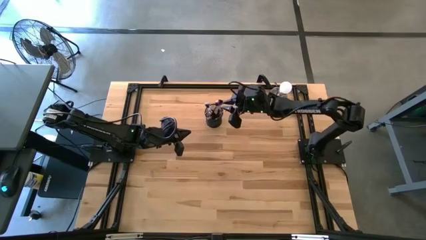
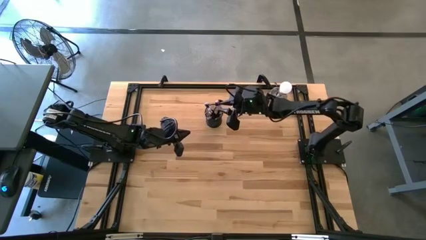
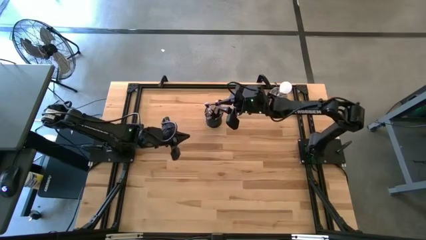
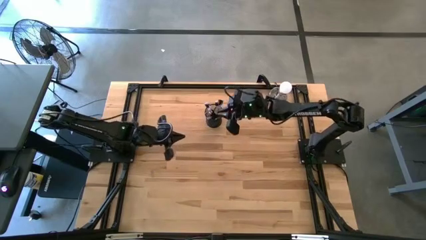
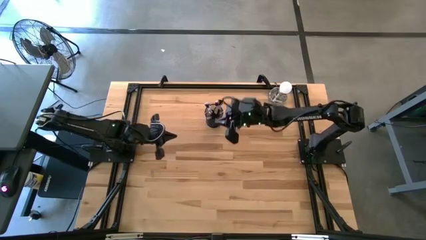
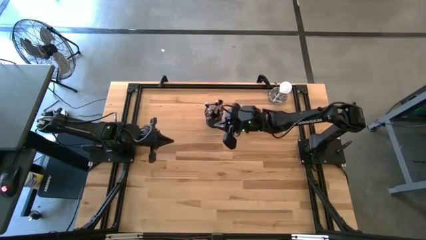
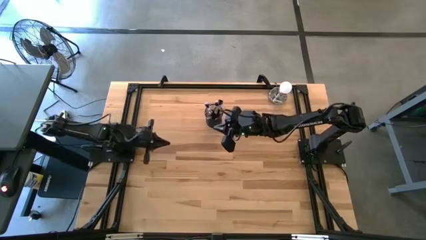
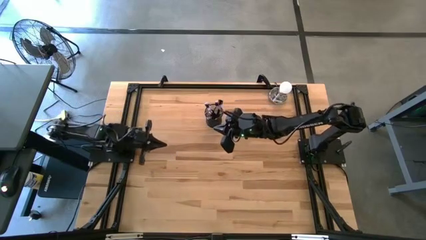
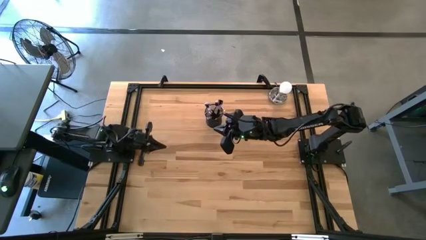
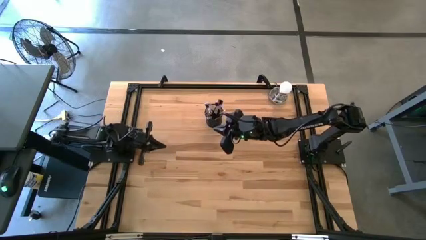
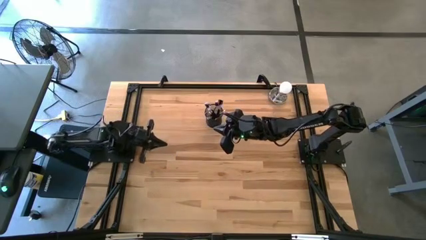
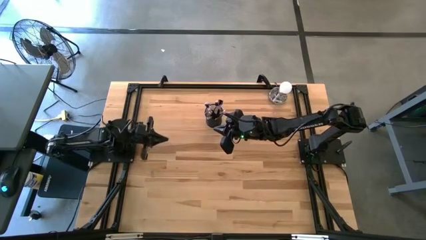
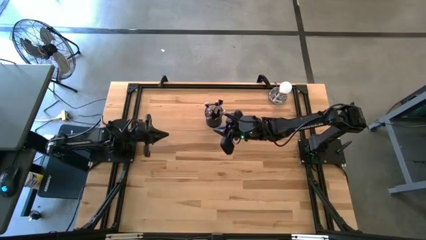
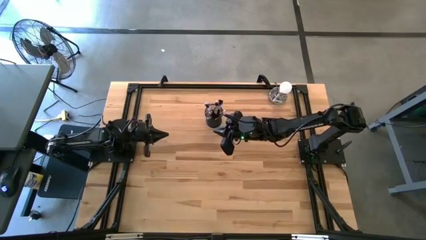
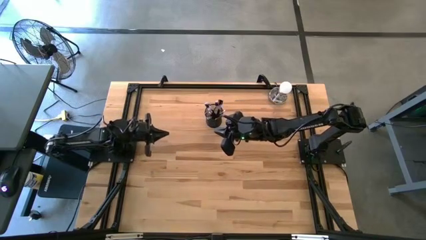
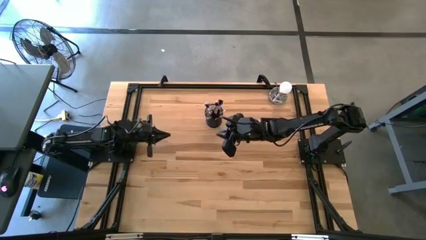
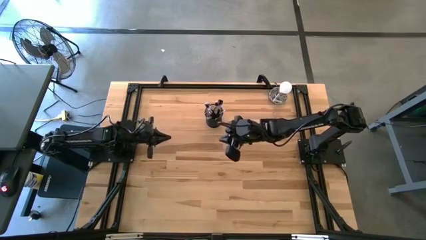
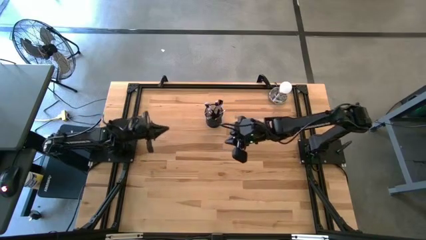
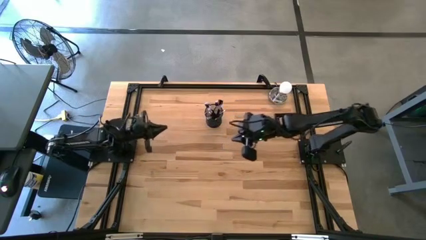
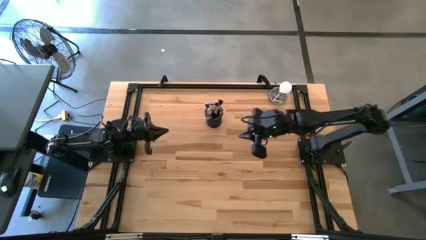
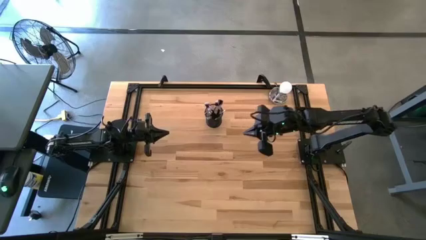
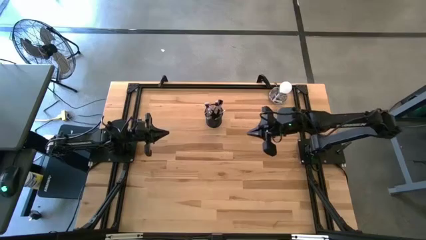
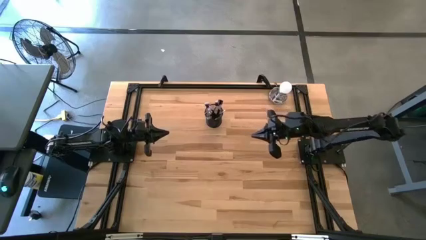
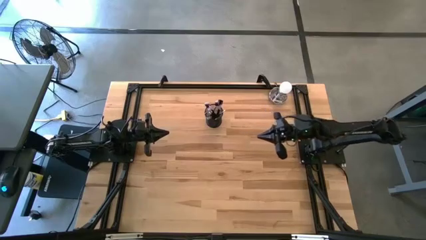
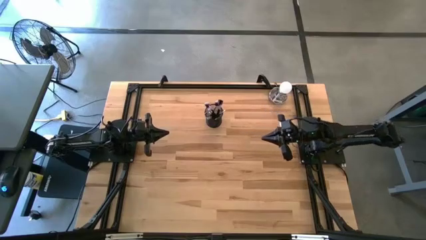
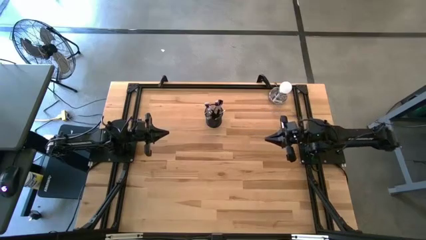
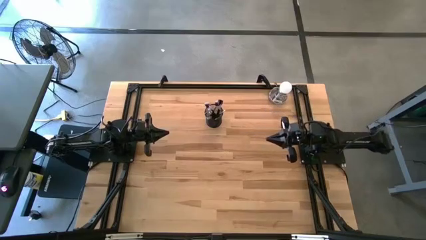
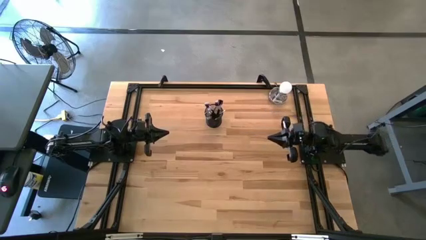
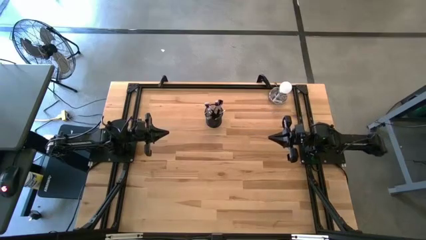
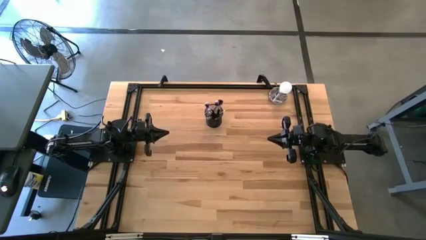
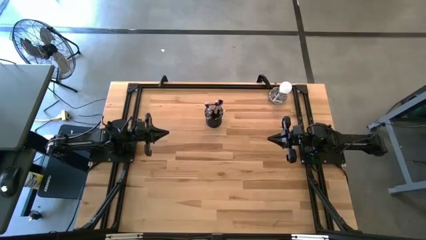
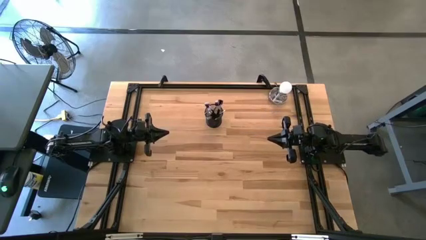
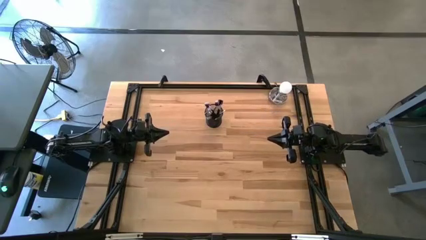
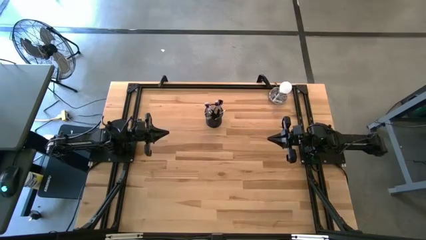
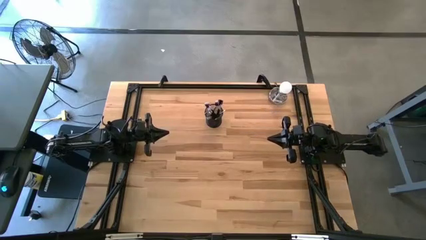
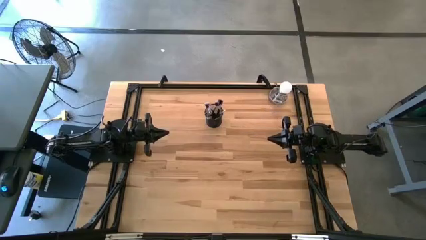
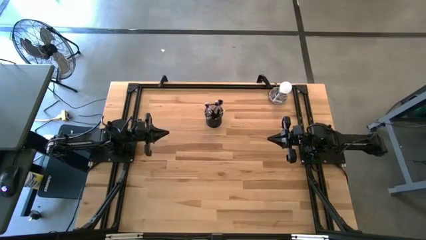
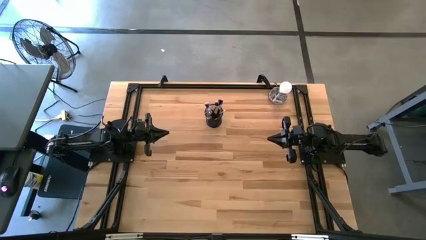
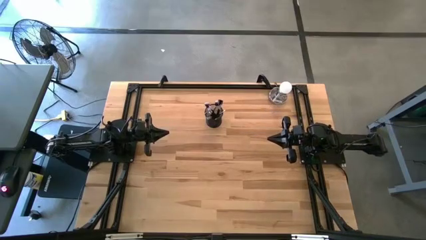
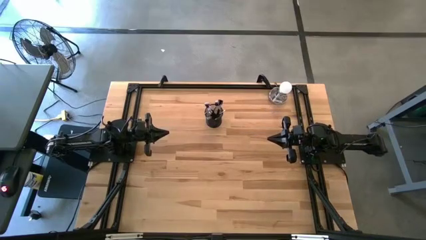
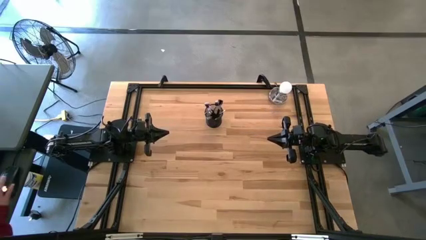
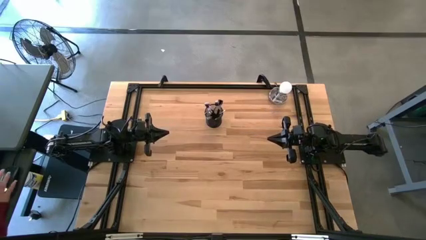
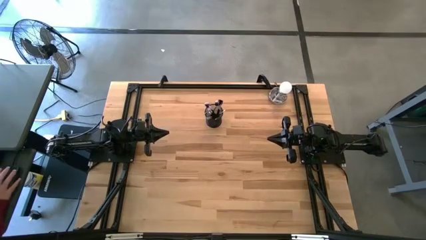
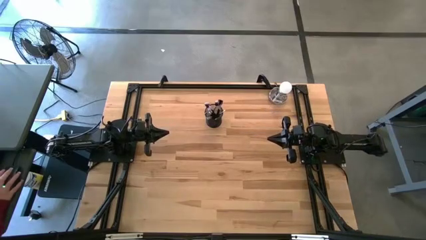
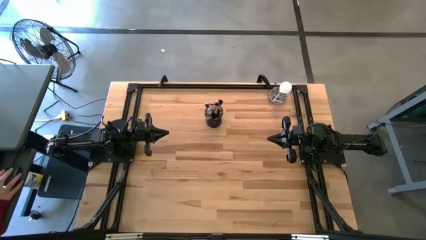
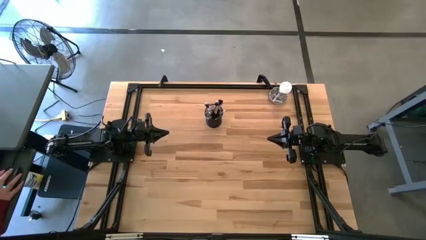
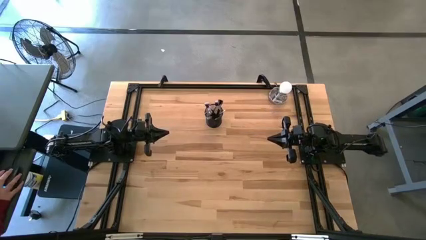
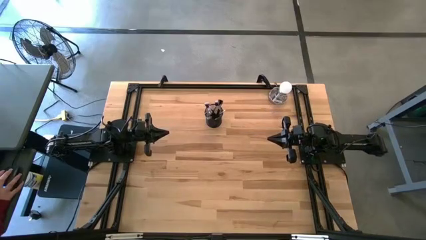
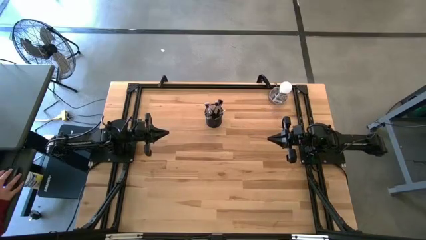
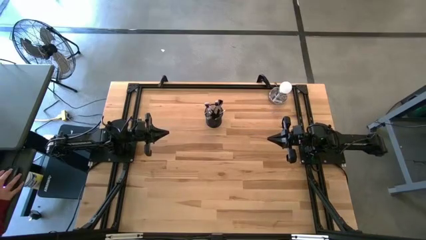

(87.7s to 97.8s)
Task: Pick & Place Makeup Brushes
Return to Home Position

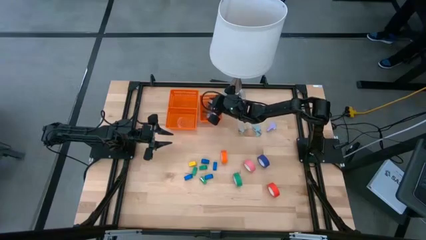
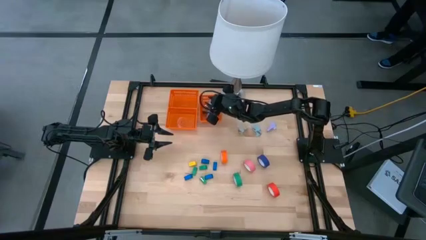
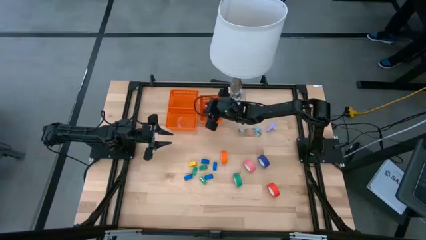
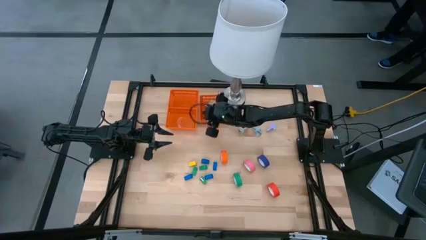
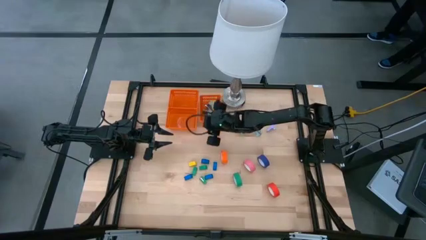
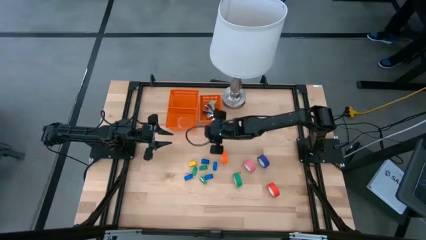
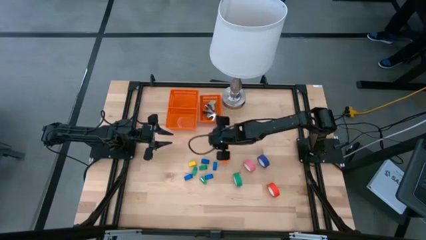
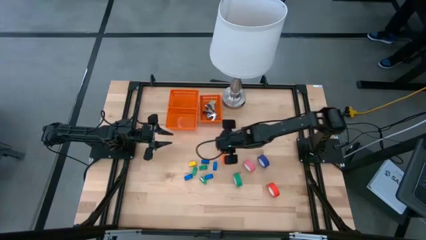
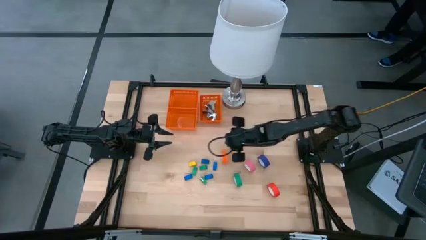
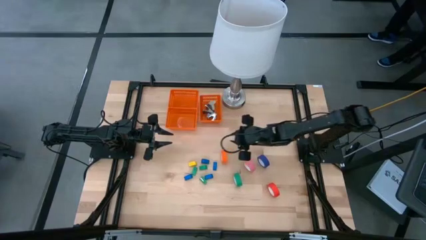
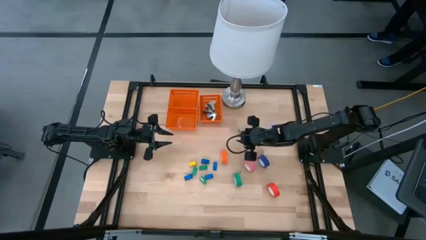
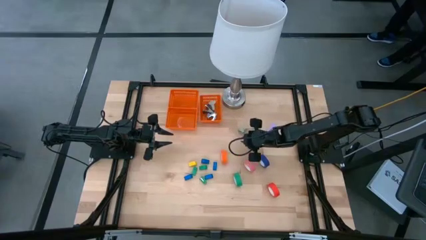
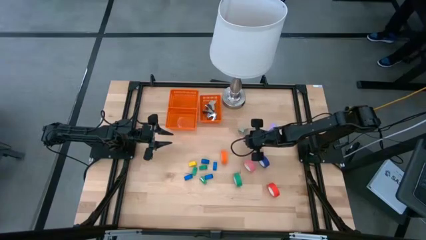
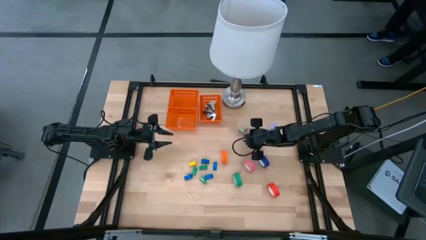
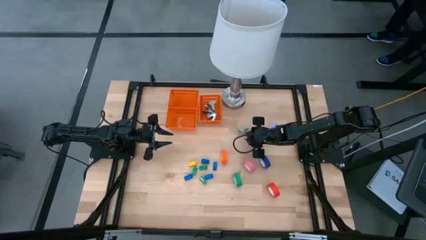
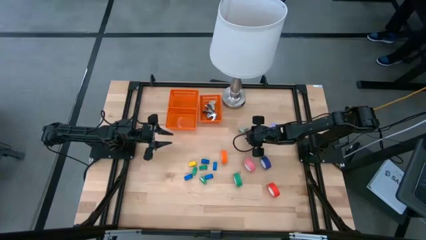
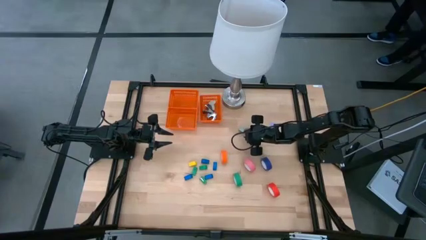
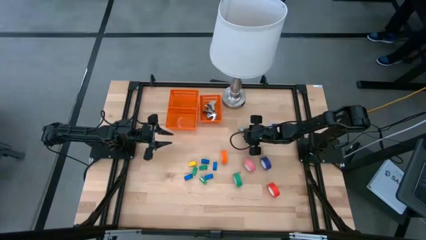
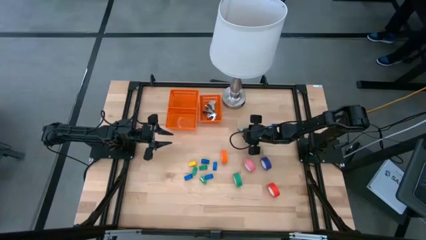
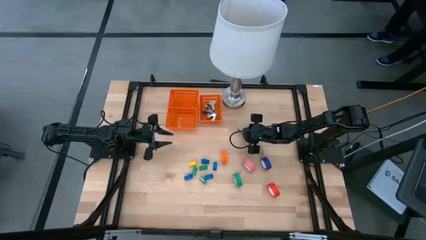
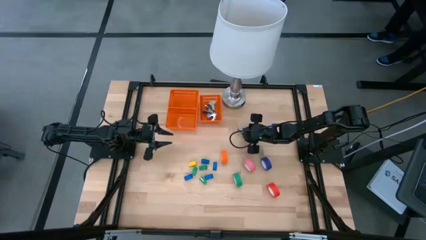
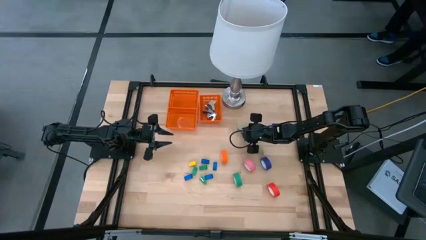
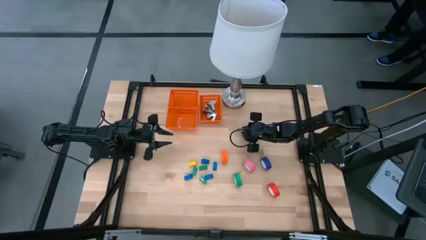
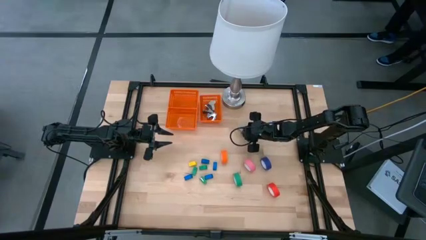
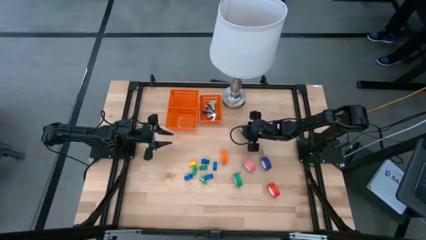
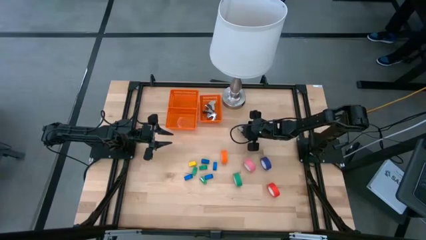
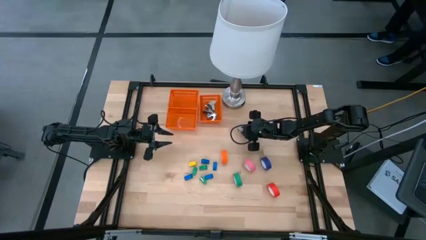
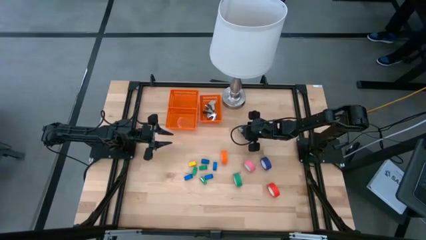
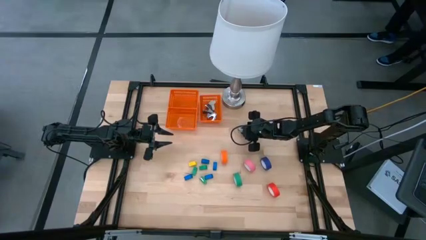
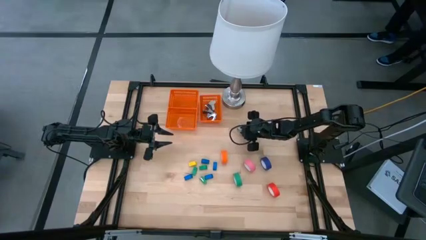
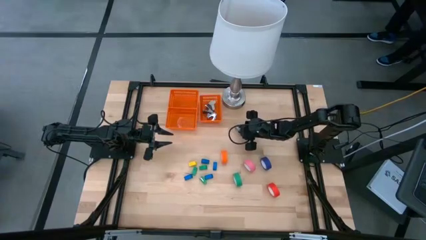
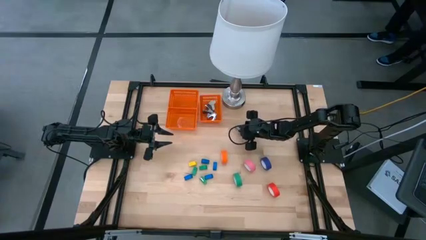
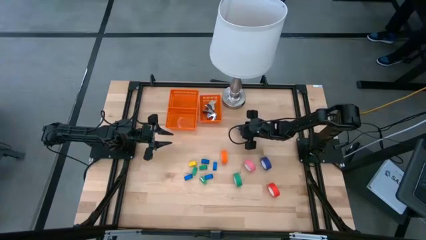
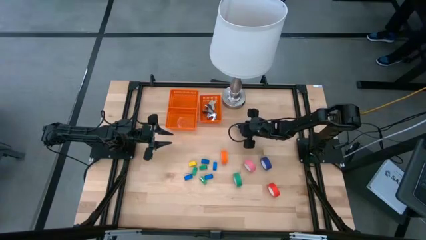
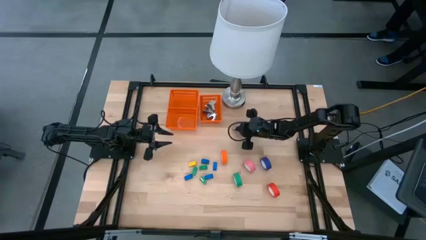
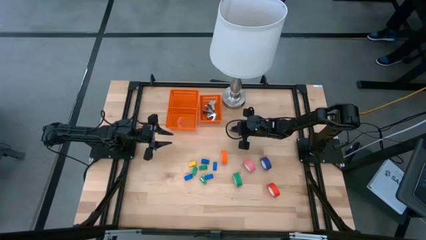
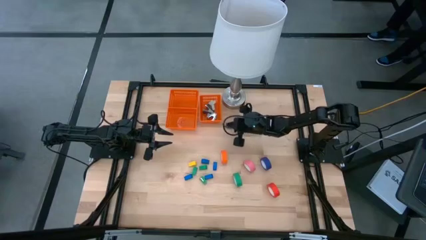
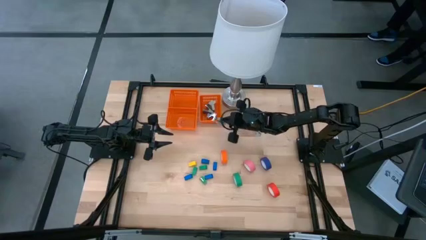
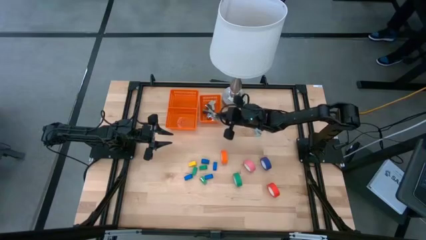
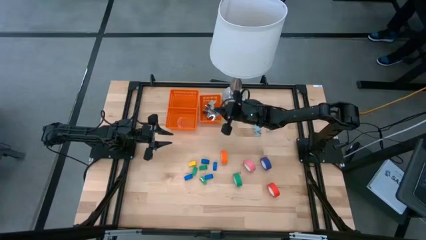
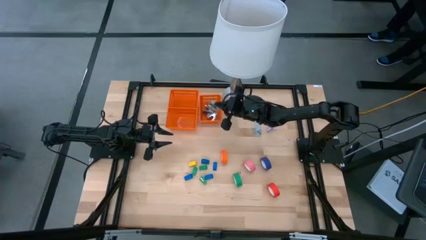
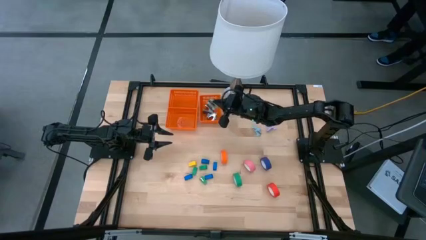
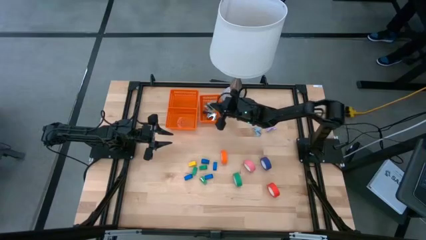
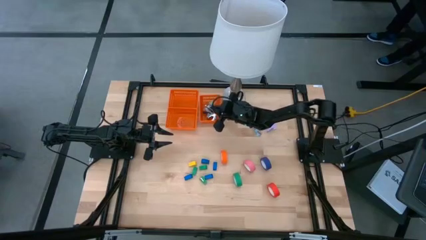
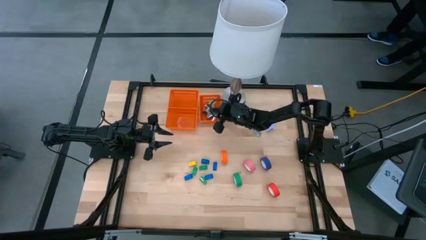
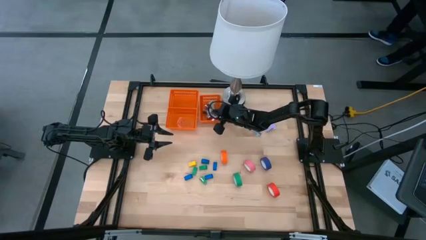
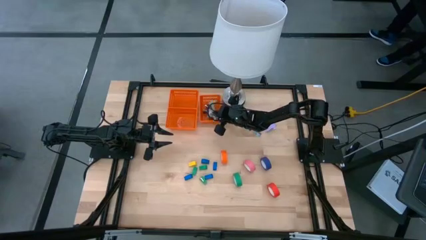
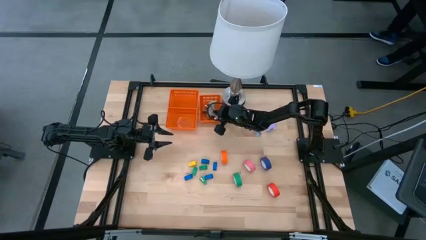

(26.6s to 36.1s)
Task: Pick and place Stapler, Stapler remover, tape
Put the gray staple remover into the right orange basket
